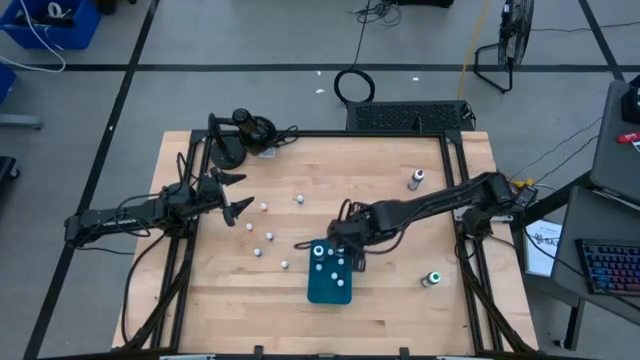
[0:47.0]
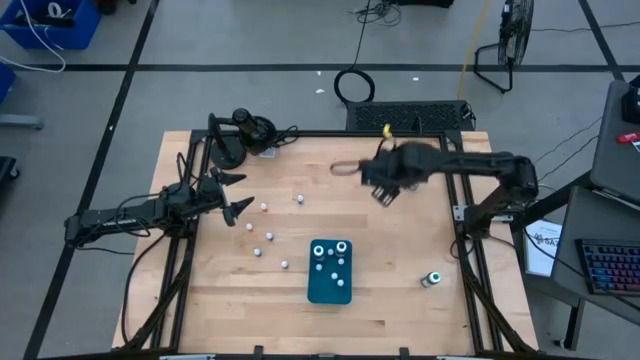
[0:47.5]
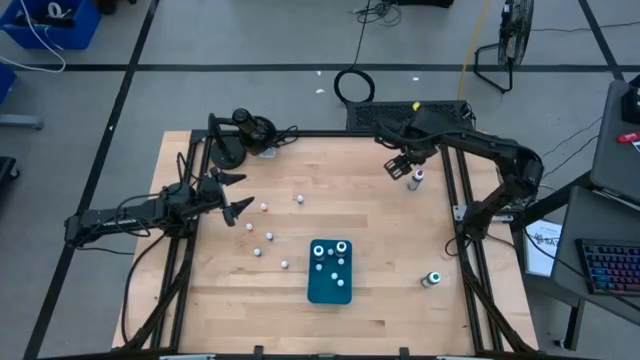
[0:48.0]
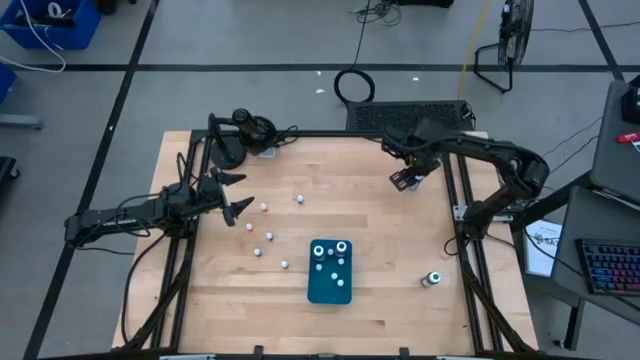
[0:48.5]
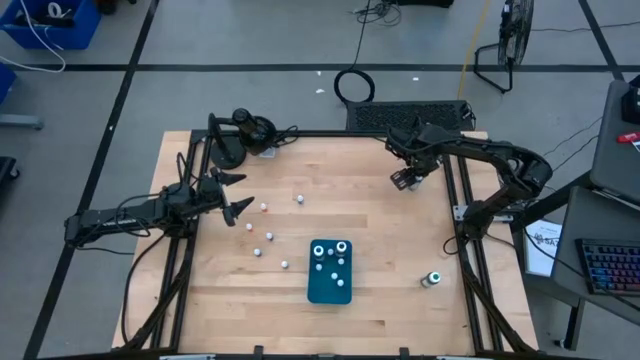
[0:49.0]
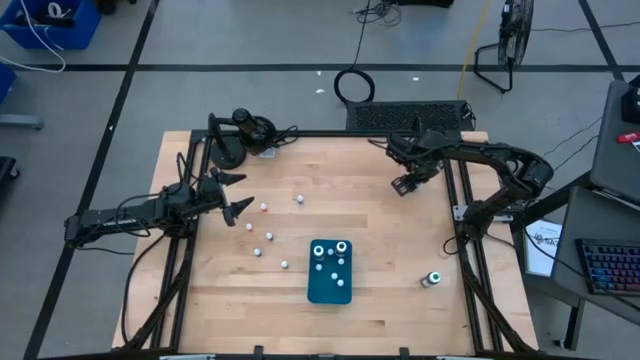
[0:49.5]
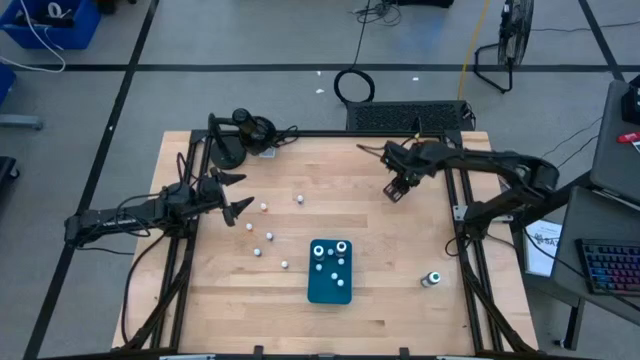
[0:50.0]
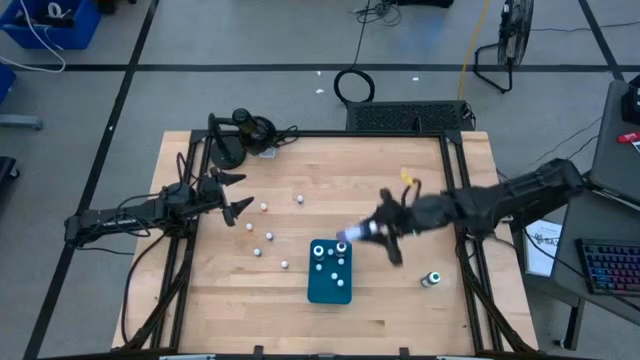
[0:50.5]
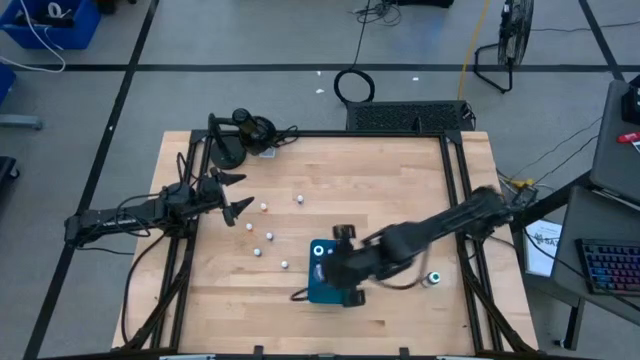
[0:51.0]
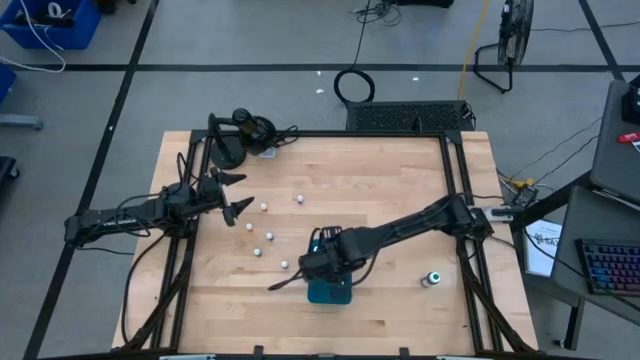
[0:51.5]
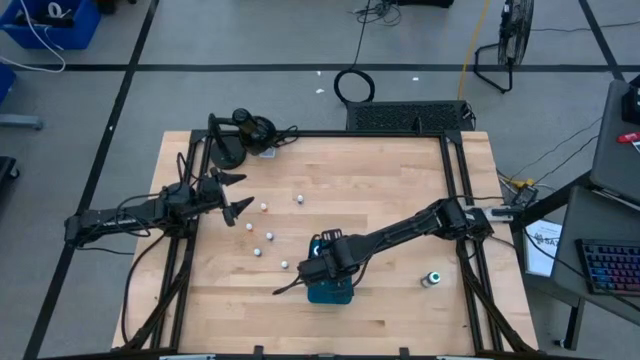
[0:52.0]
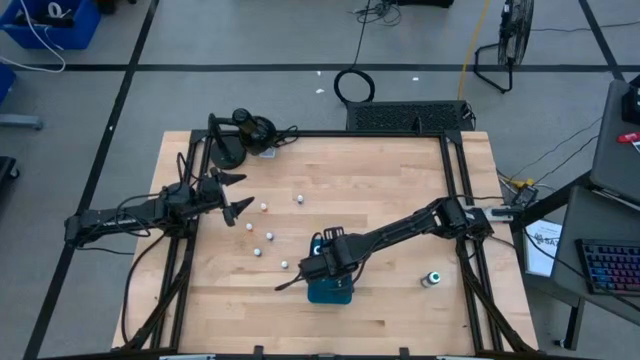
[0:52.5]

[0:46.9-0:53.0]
Task: Pick & Place food coloring
Put the purple big food coloring bottle into the blue bin

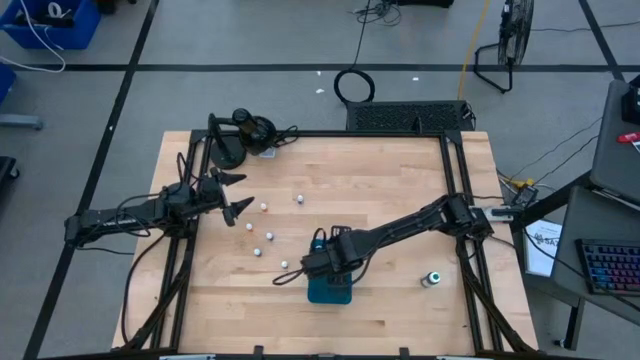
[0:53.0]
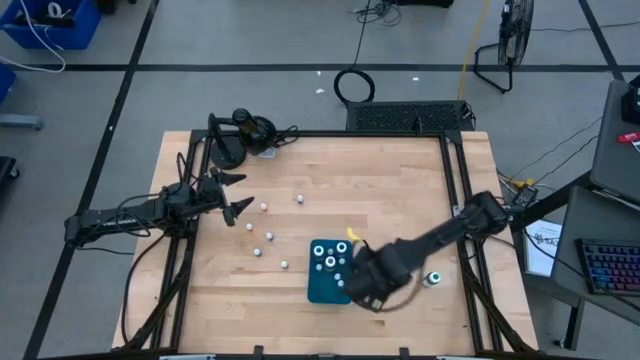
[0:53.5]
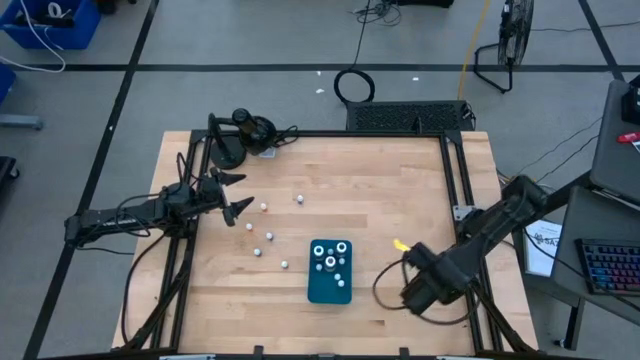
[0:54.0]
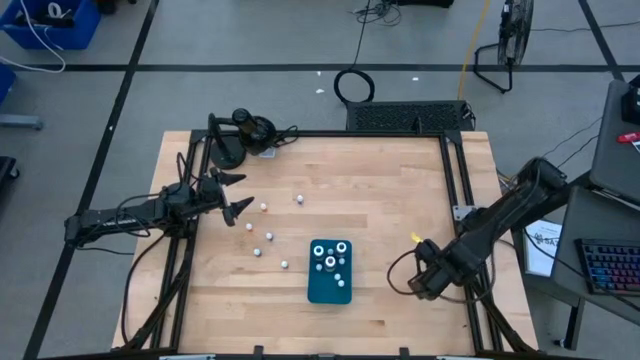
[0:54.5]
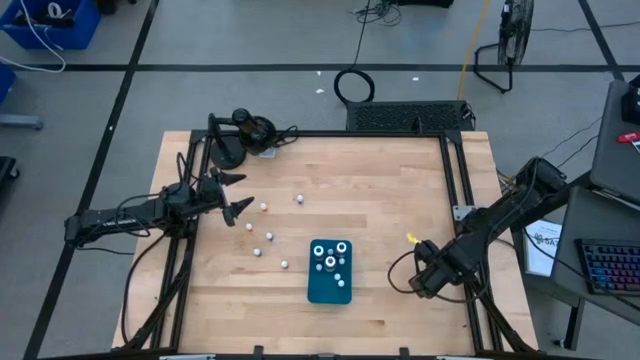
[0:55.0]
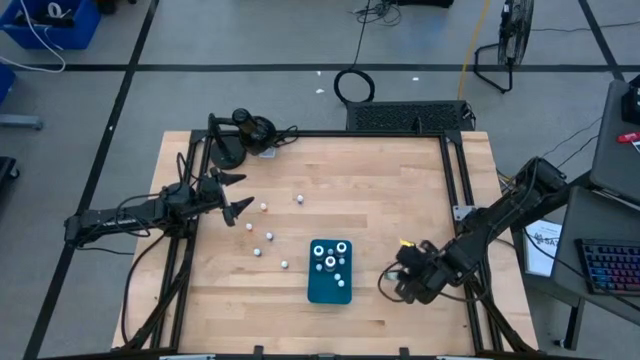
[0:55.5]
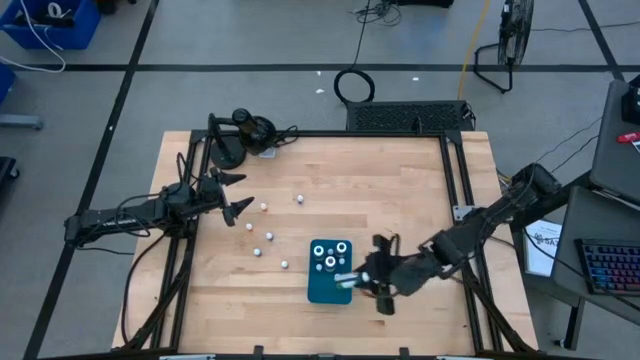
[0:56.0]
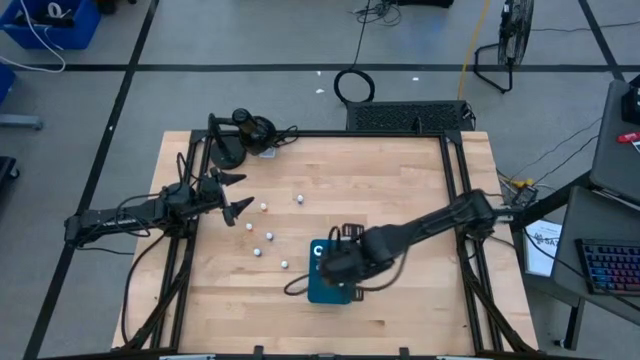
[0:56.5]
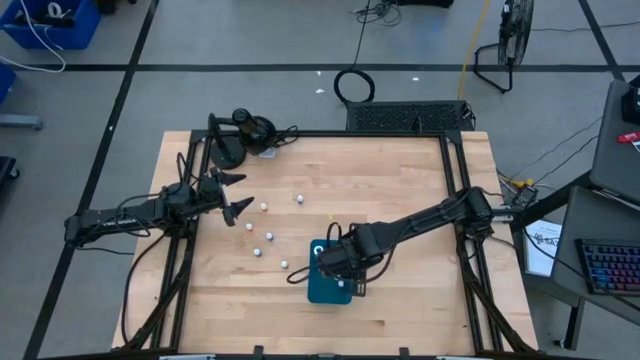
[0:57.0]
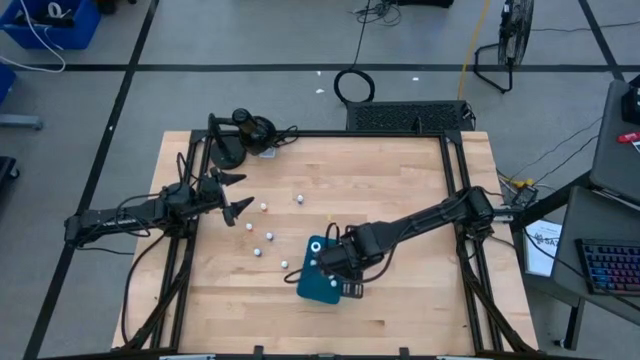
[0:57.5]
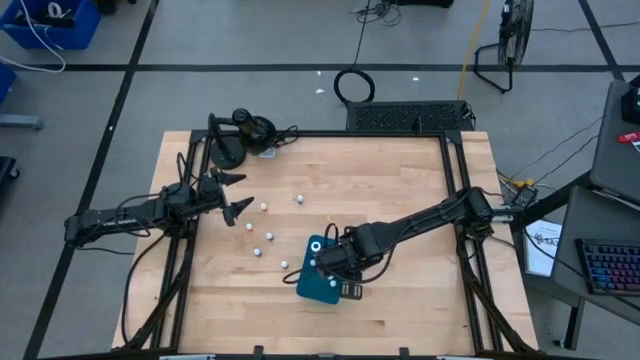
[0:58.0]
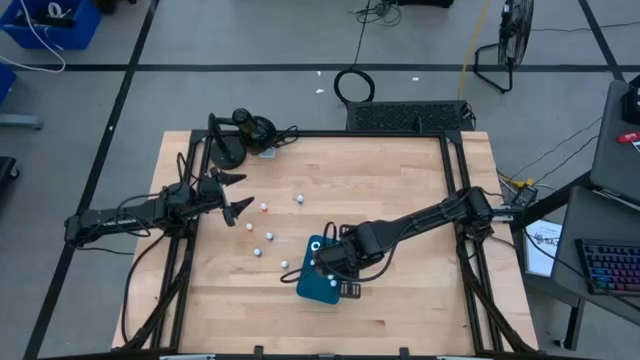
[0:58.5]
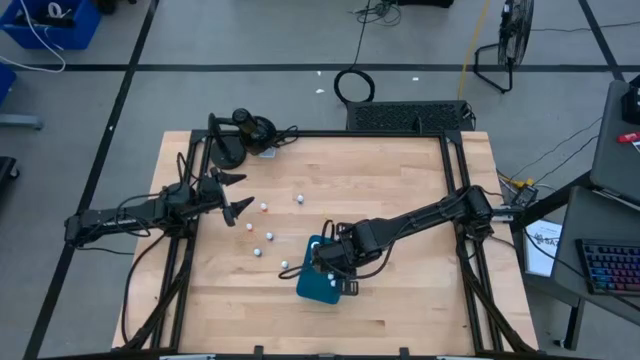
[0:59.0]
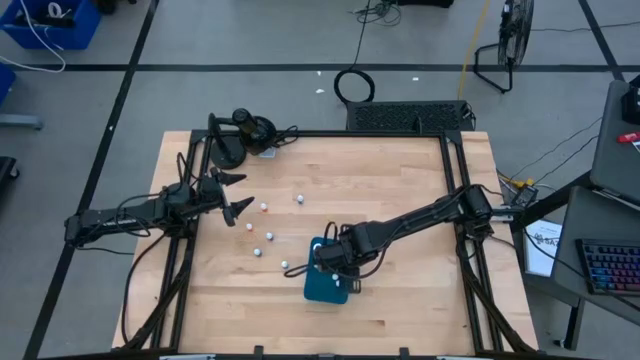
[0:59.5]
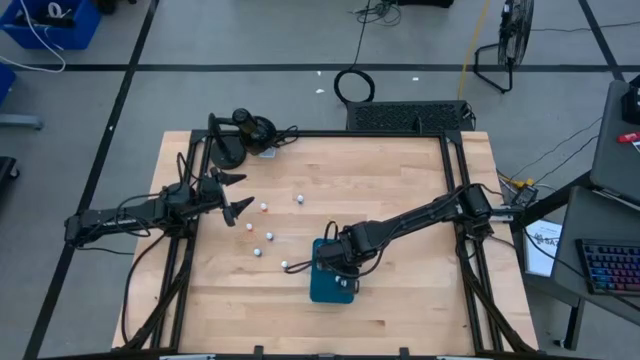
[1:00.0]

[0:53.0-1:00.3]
Put the green big food coloring bottle into the blue bin

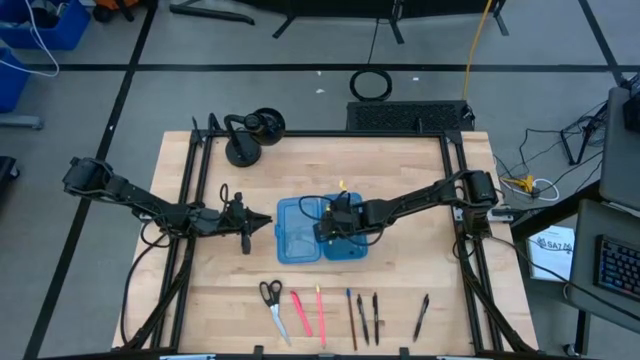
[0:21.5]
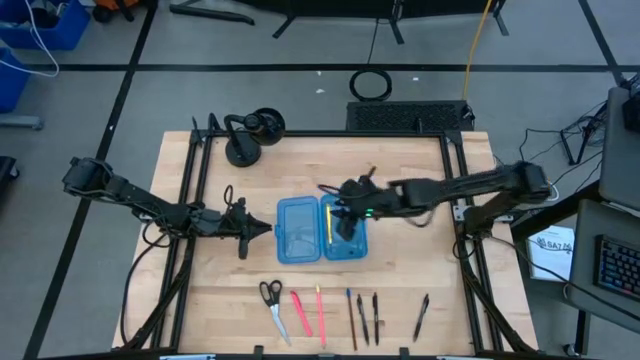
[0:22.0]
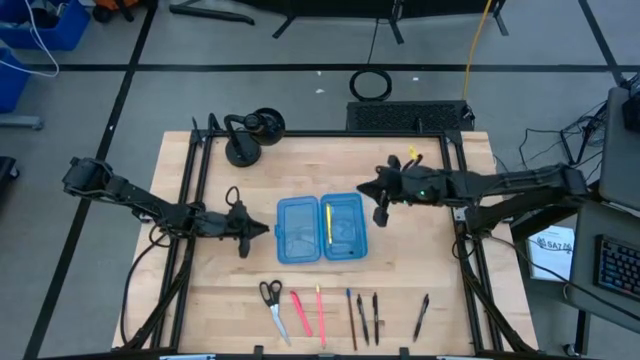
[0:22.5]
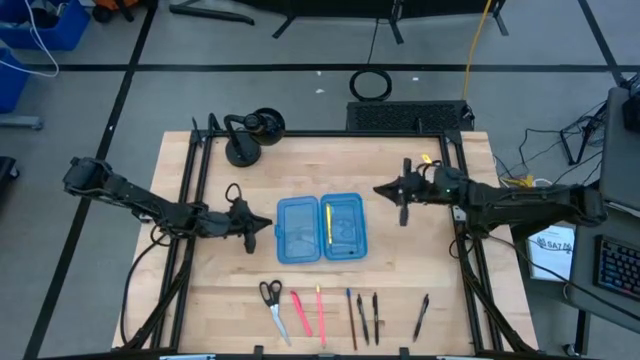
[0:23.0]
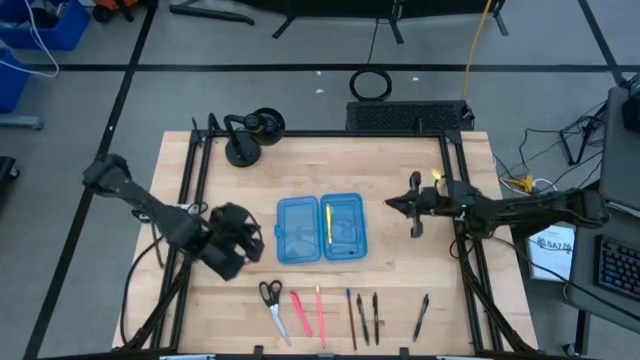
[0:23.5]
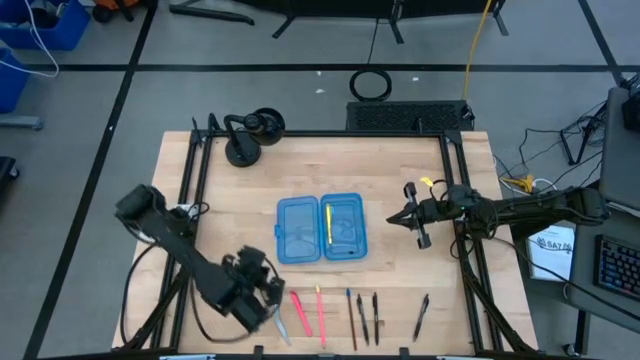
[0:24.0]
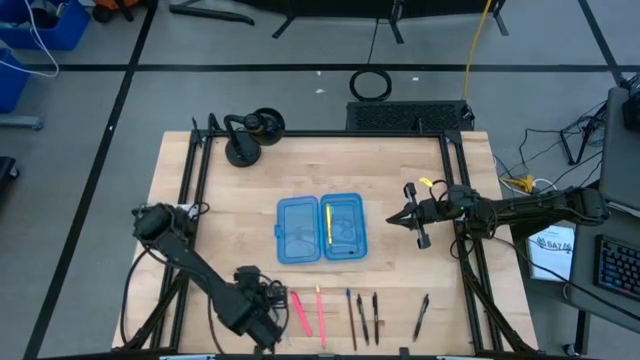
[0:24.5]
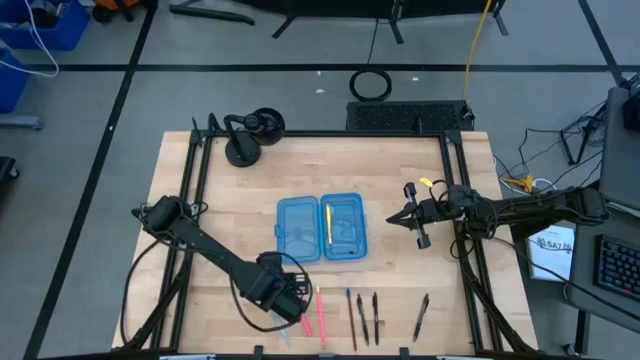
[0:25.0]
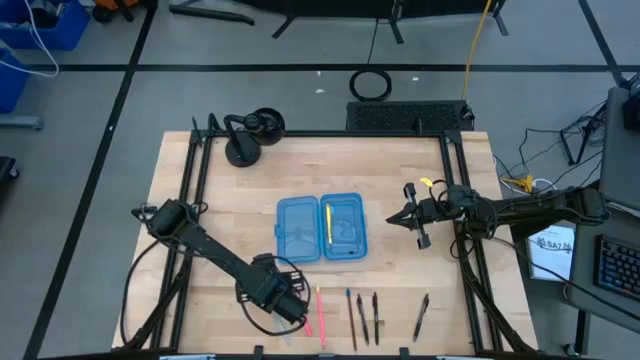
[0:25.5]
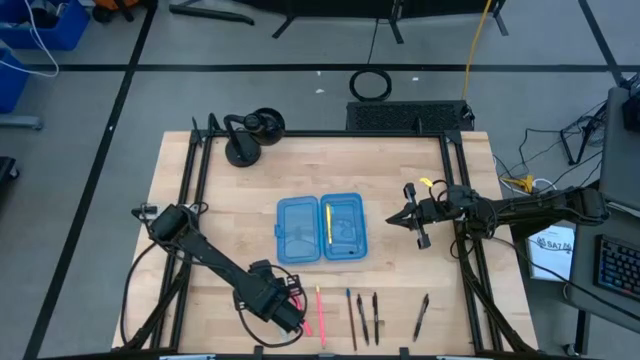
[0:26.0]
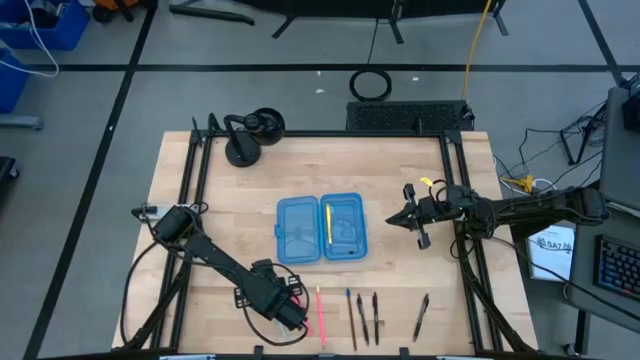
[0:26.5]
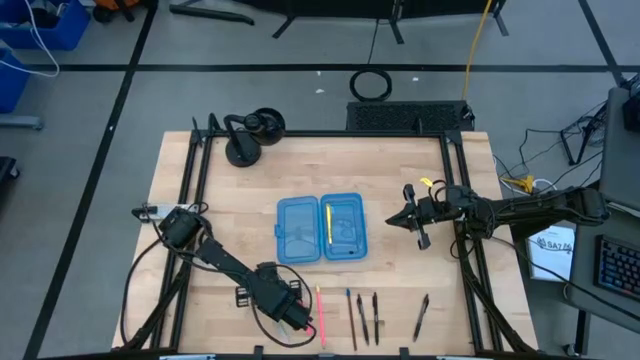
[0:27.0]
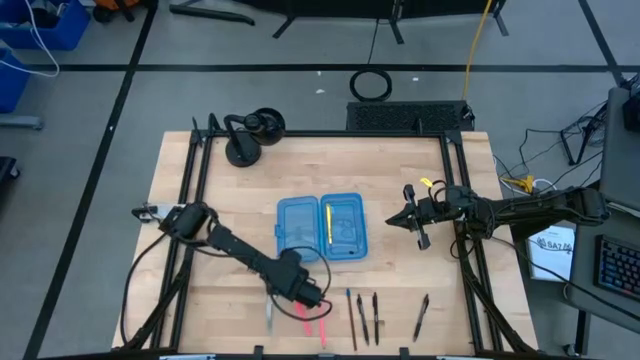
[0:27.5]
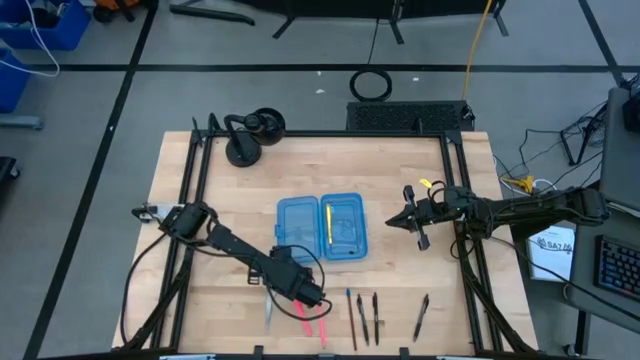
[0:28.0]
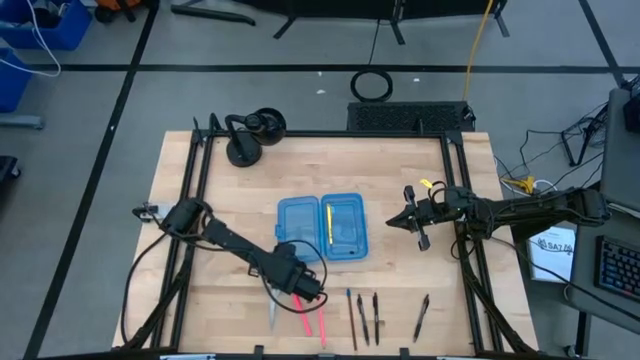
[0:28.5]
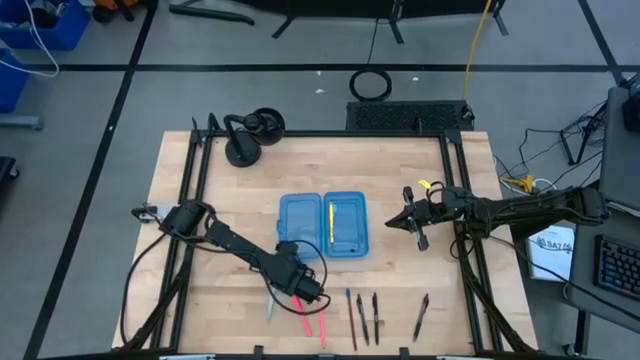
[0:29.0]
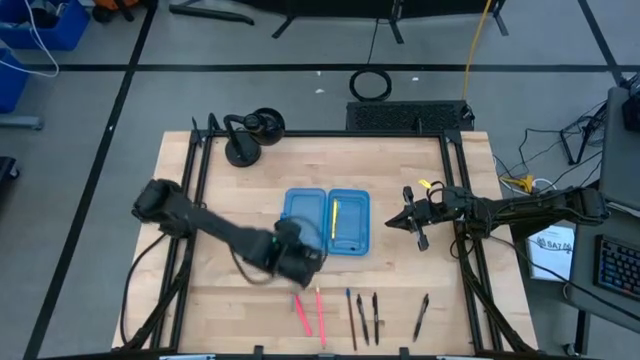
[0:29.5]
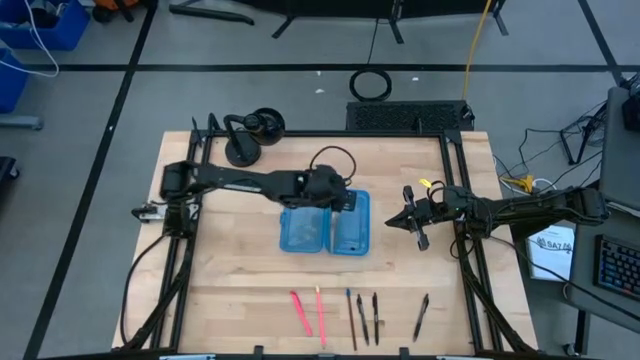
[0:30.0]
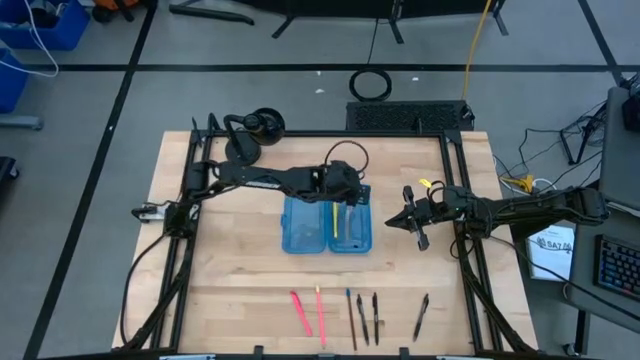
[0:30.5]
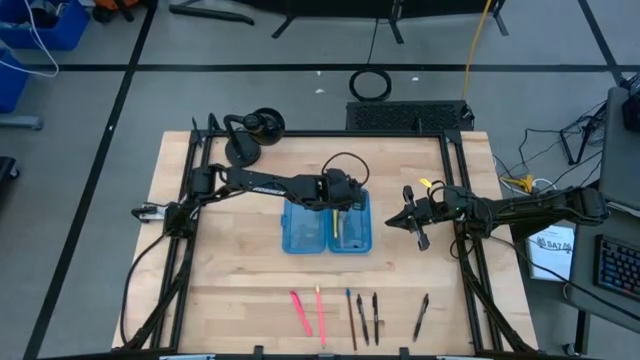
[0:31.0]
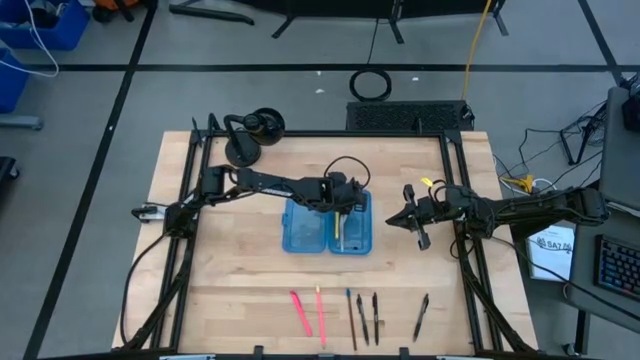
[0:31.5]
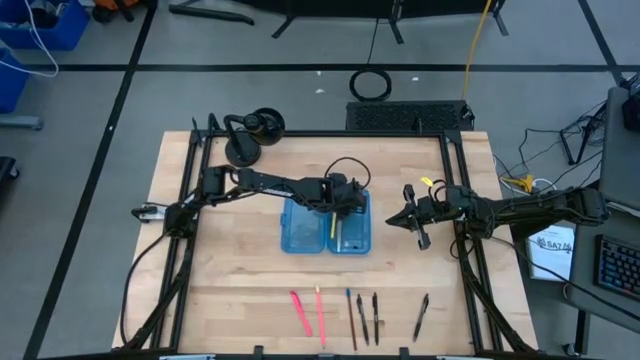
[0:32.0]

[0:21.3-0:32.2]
Task: Pick & place school supplies into a supply box
Put the black scissors into the blue supply box
